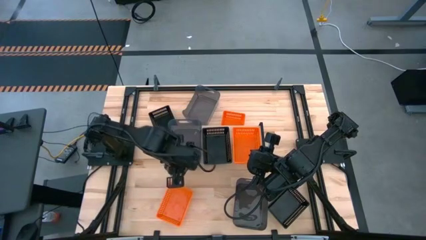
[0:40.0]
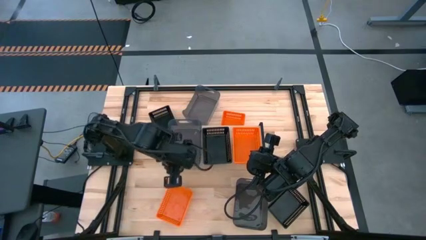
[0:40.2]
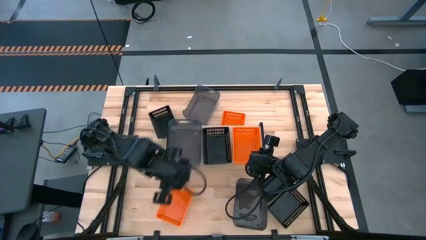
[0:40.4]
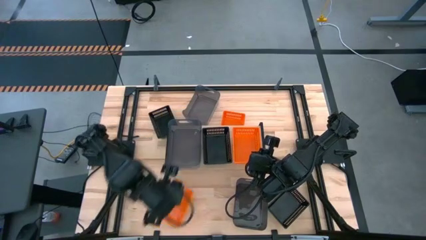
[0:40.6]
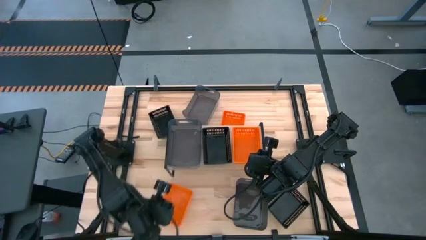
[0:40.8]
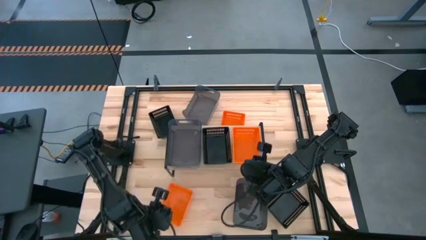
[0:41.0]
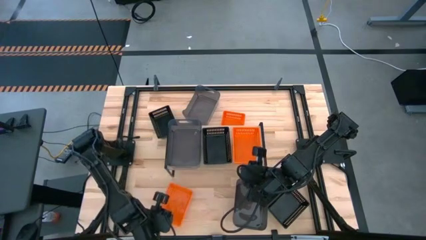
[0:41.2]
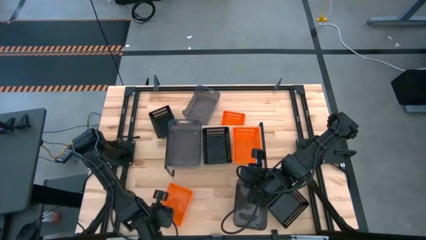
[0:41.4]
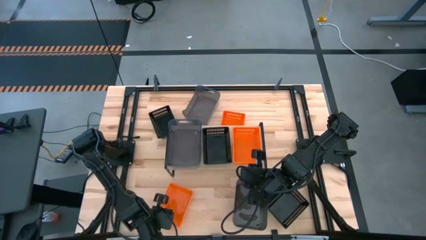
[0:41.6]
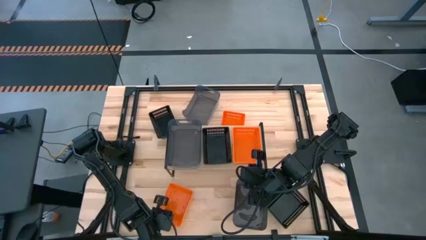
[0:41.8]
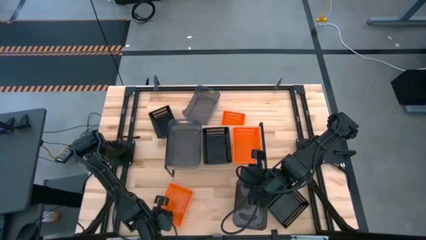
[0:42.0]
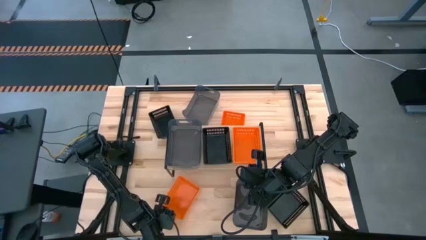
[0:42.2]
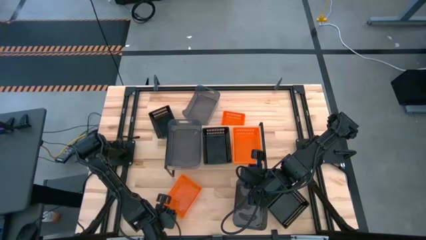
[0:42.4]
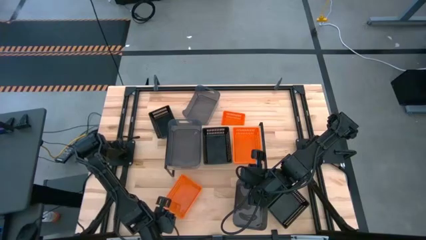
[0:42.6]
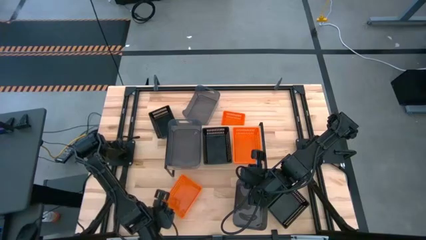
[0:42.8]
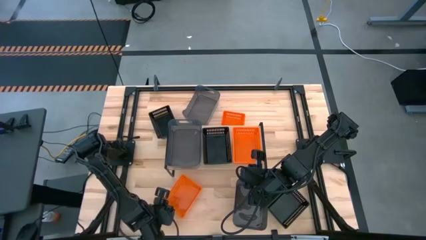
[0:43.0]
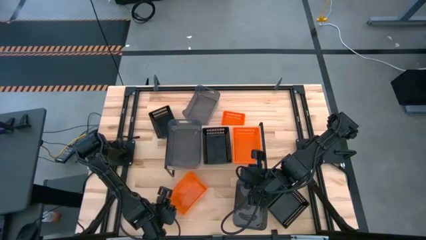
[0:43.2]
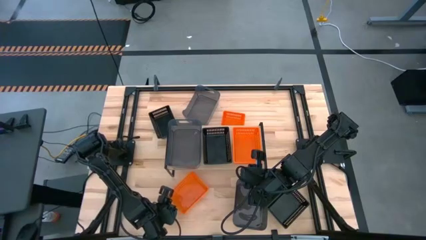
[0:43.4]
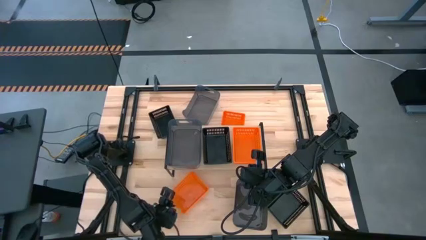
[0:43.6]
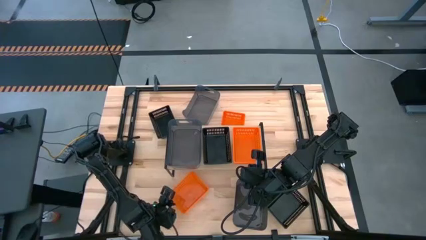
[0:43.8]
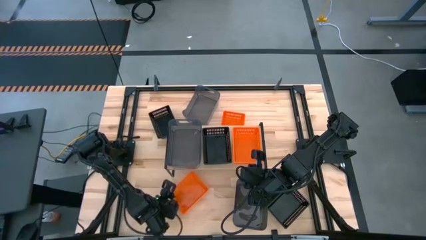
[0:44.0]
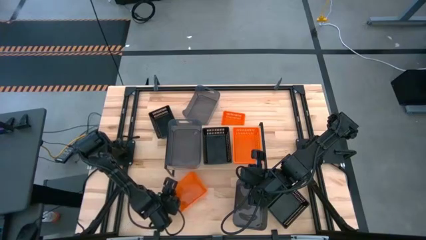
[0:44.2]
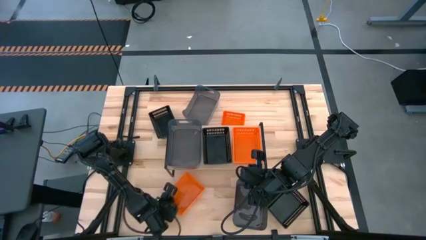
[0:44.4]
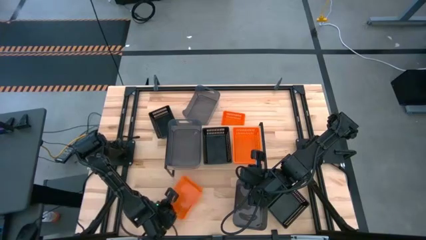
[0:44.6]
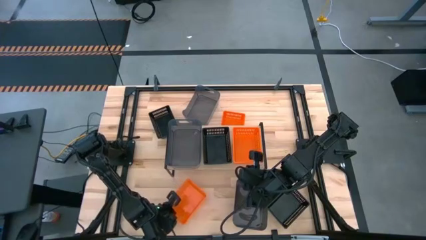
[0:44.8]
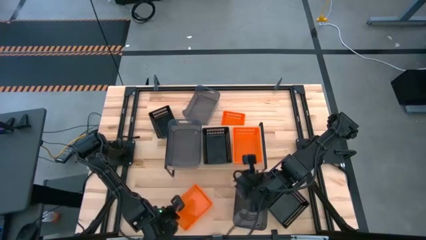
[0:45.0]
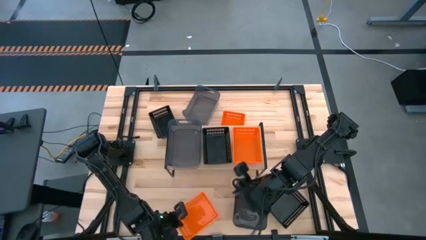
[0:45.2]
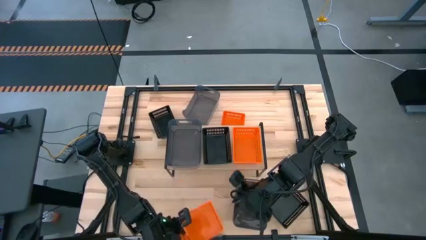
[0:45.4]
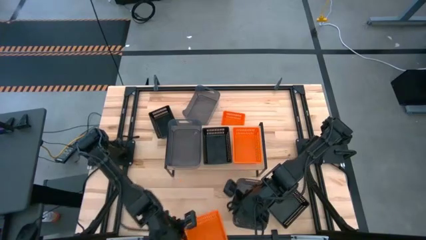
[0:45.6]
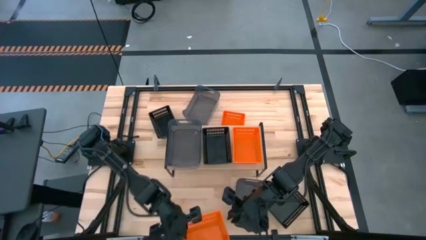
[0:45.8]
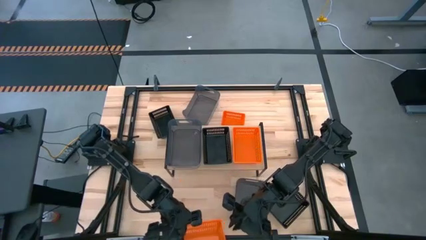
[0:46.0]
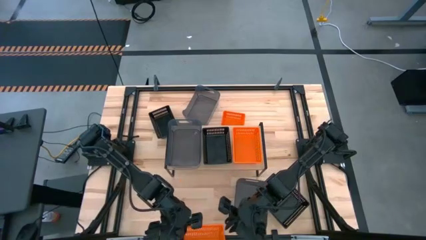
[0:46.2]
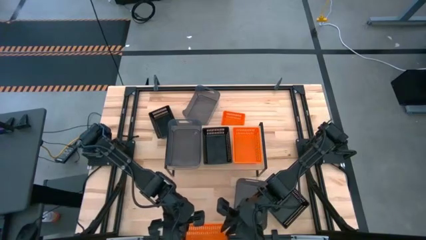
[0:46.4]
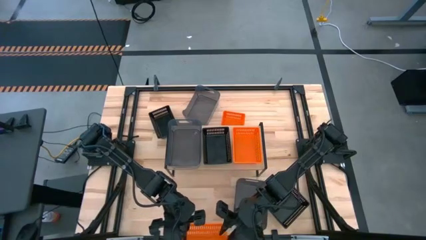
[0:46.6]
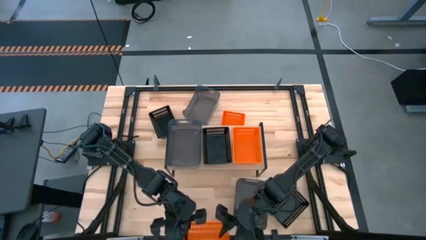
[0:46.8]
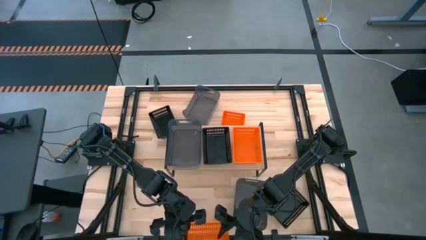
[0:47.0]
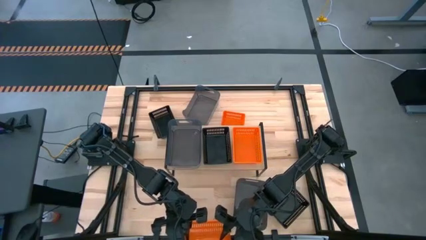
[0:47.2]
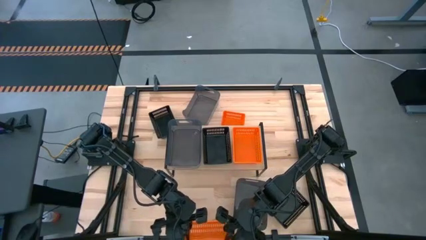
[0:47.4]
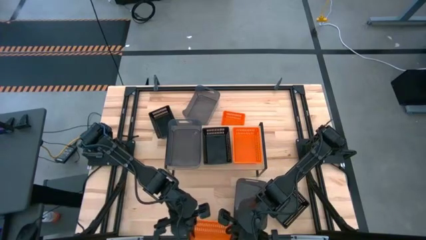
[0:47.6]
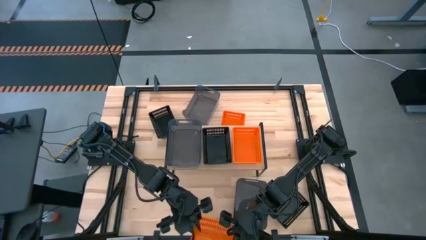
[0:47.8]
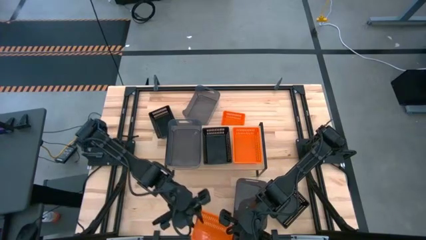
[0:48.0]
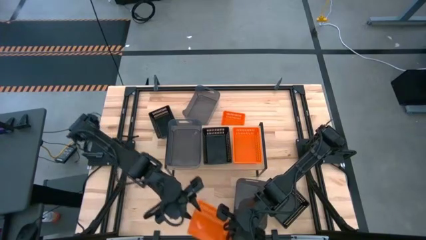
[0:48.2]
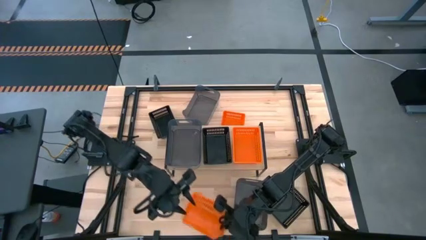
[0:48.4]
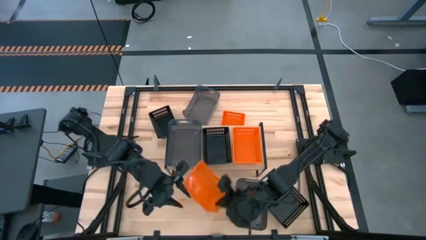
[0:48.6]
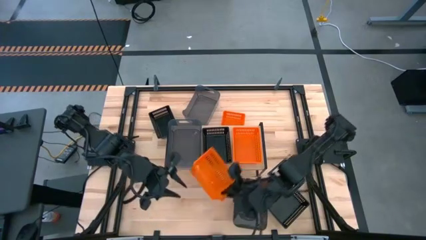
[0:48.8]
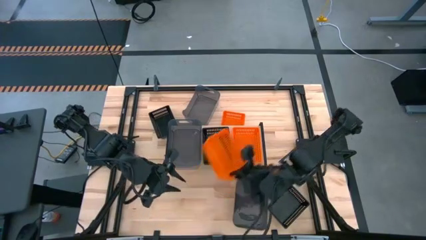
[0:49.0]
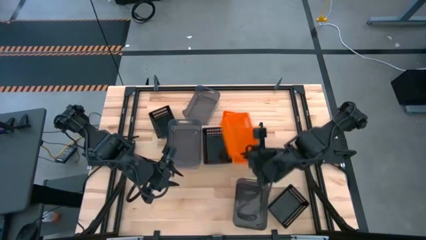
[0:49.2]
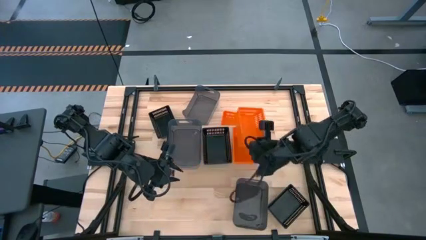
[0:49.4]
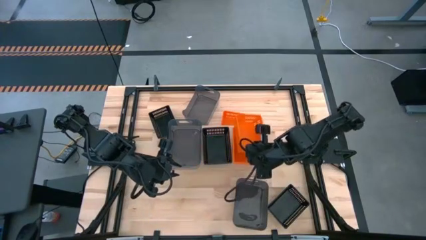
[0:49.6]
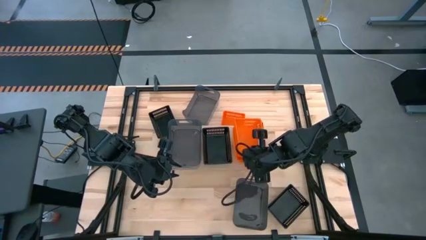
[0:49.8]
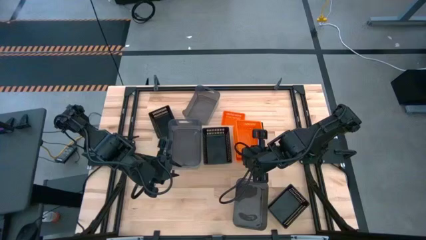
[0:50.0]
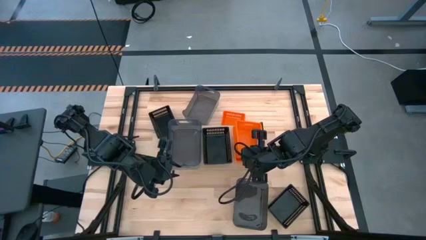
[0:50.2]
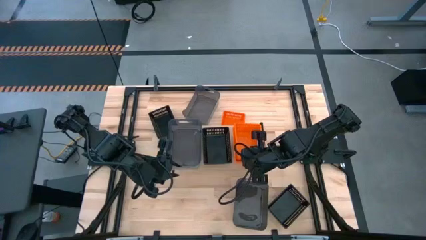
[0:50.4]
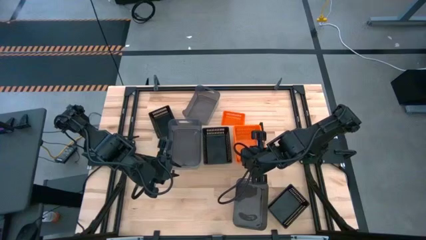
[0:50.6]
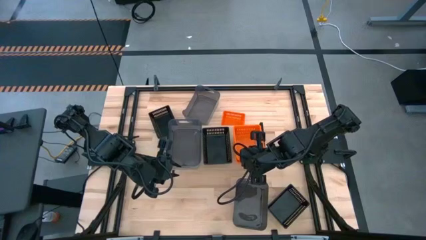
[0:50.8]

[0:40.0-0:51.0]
Task: Stack baskets on shelf by color
Stack the bottom orange bin on top of the orange bin on the shelf

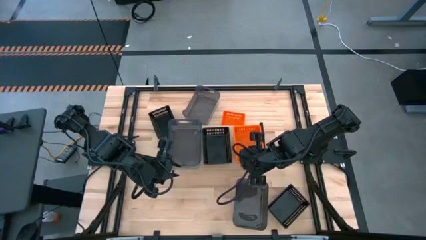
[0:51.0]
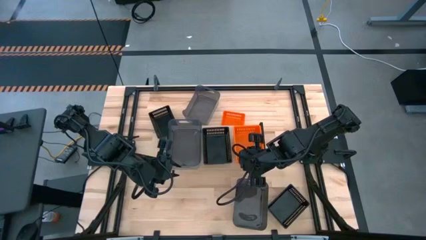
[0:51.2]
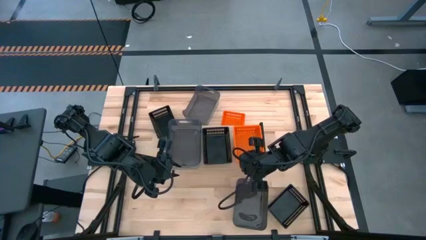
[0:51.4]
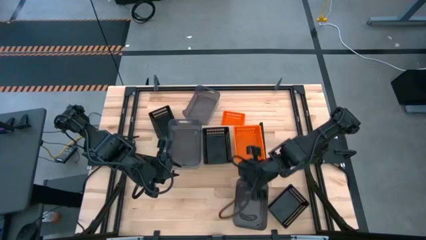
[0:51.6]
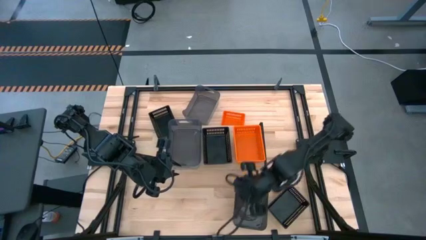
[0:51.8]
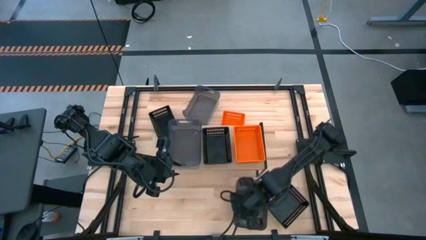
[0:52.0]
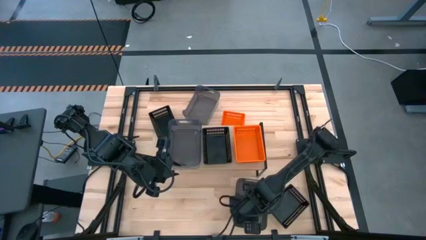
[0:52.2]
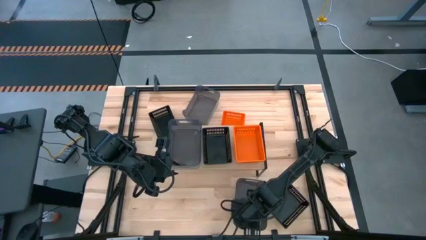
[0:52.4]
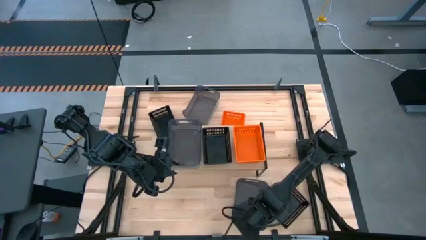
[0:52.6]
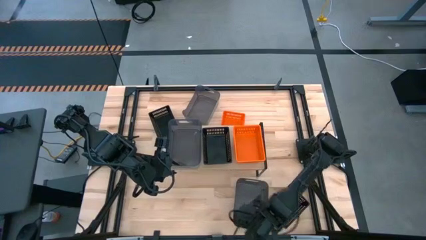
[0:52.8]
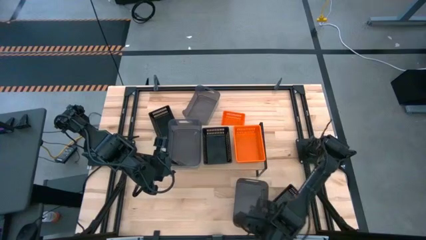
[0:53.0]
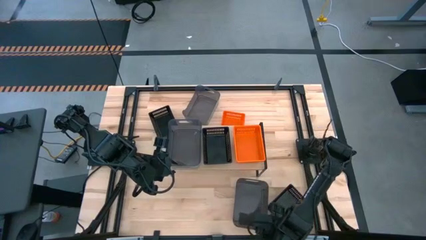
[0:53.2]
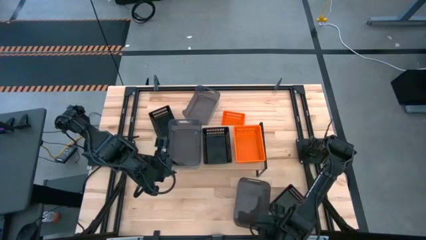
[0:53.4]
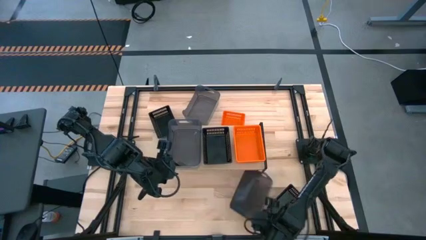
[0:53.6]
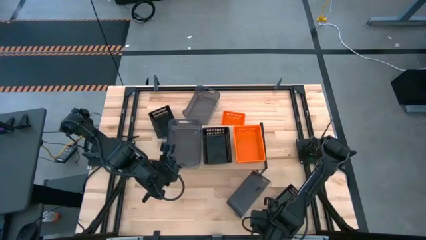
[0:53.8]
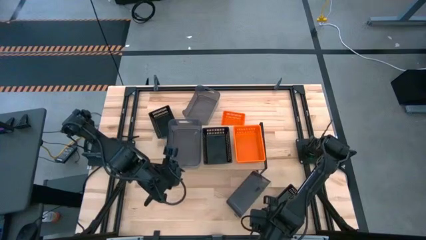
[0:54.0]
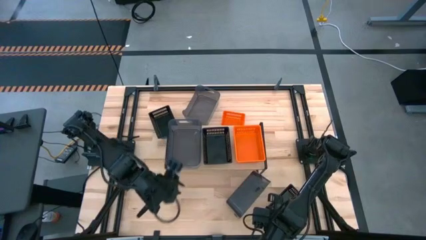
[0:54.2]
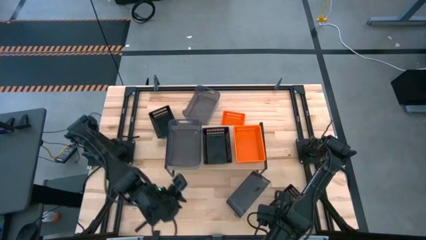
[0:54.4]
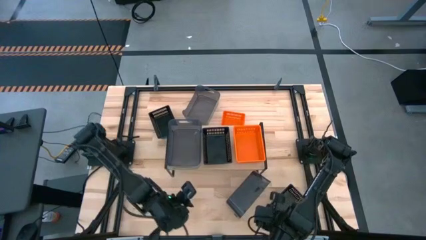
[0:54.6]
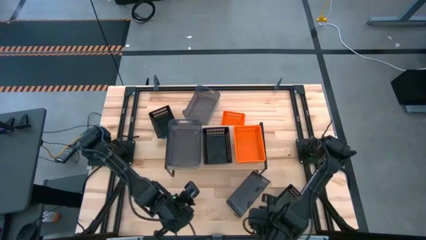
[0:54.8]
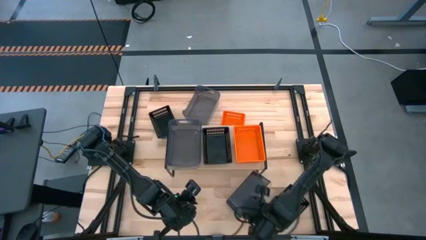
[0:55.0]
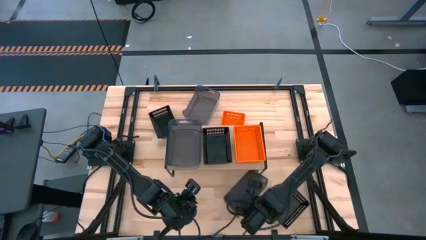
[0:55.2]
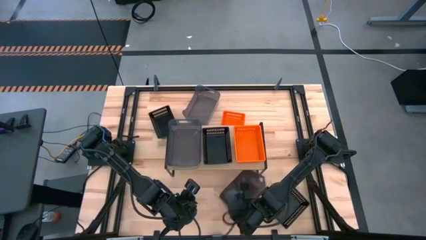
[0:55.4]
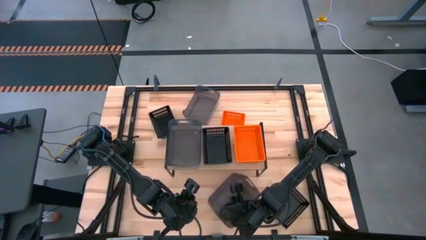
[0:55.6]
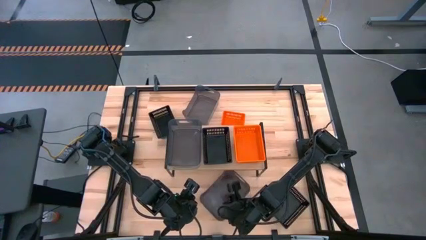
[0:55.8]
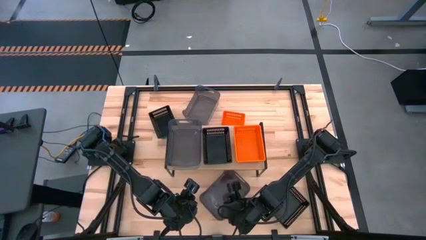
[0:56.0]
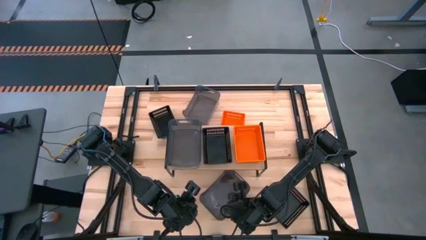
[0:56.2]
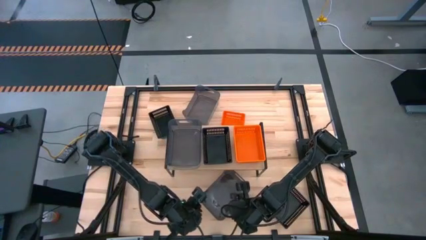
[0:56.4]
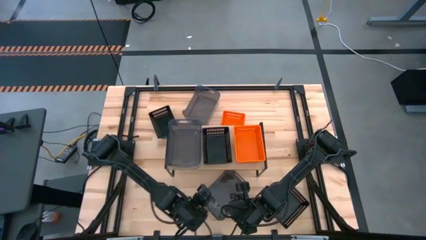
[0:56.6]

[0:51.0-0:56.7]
Stack the bottom transparent black bin on top of the transparent black bin on the shelf
